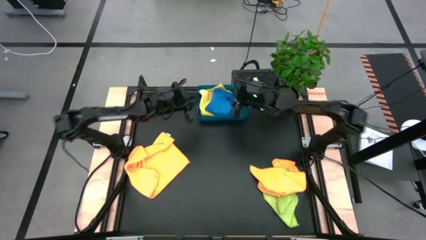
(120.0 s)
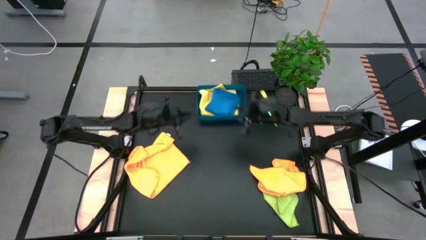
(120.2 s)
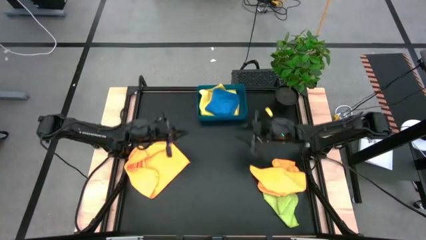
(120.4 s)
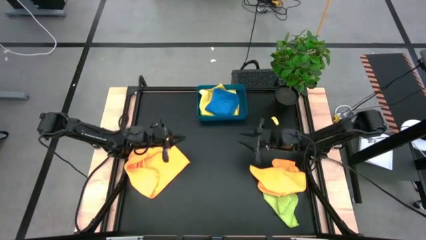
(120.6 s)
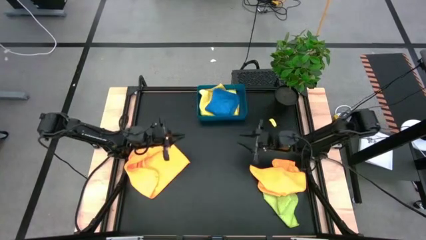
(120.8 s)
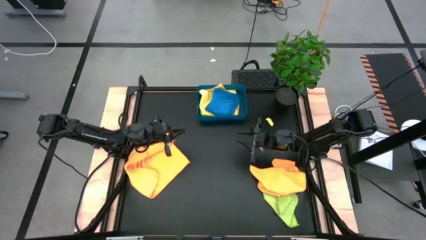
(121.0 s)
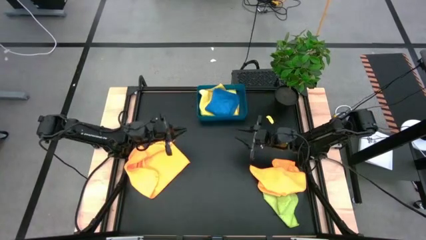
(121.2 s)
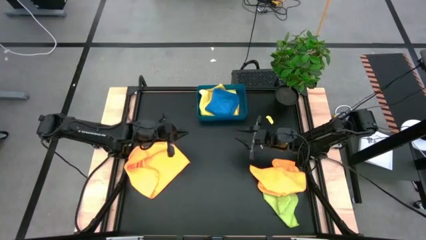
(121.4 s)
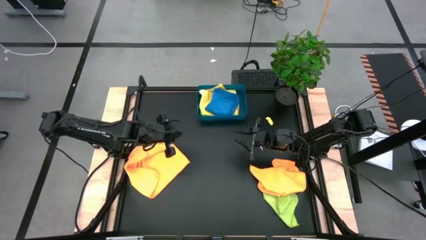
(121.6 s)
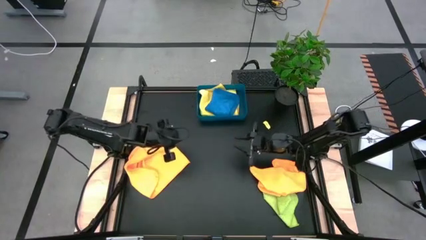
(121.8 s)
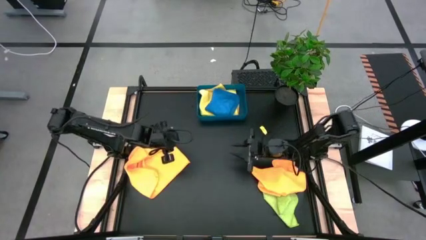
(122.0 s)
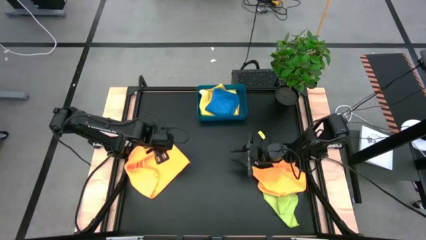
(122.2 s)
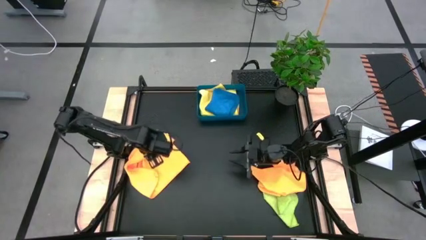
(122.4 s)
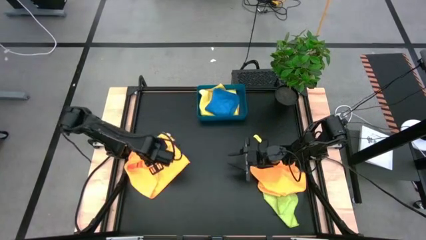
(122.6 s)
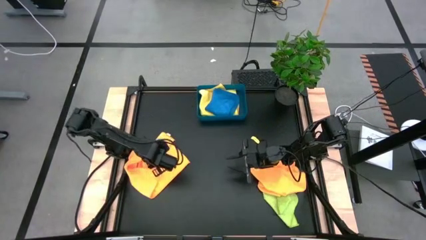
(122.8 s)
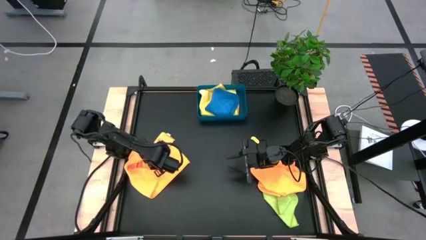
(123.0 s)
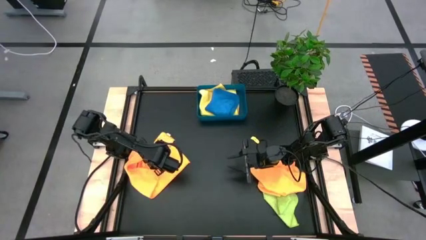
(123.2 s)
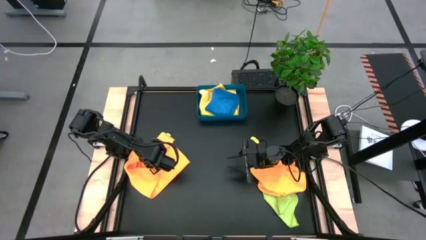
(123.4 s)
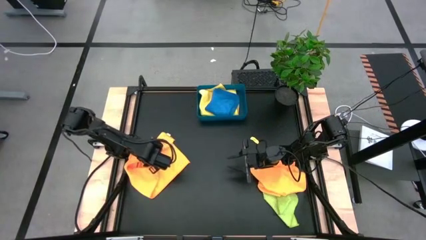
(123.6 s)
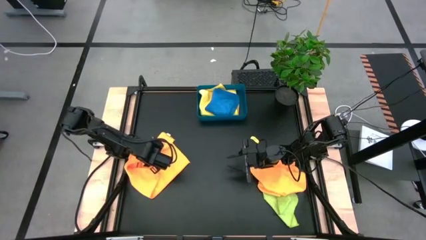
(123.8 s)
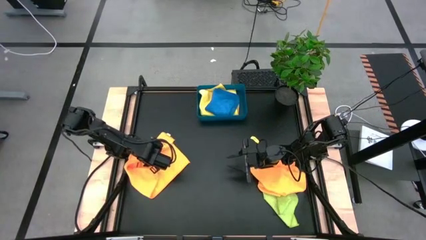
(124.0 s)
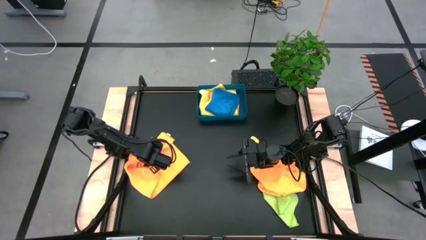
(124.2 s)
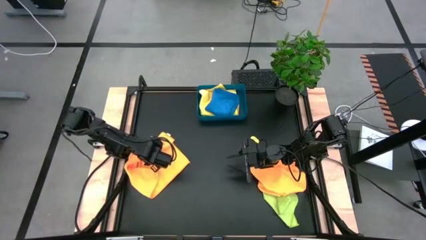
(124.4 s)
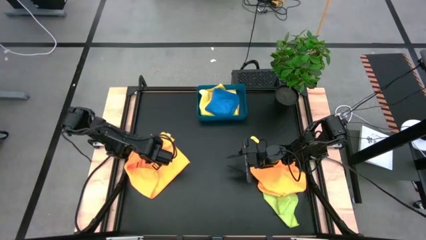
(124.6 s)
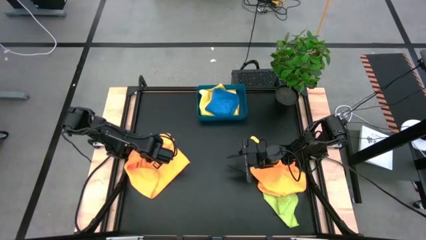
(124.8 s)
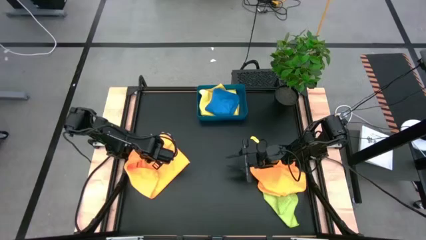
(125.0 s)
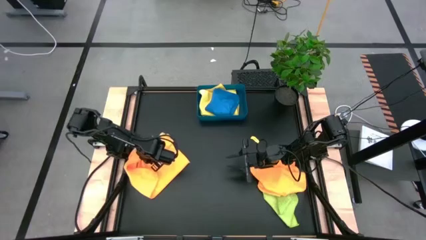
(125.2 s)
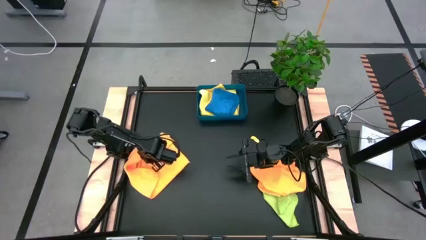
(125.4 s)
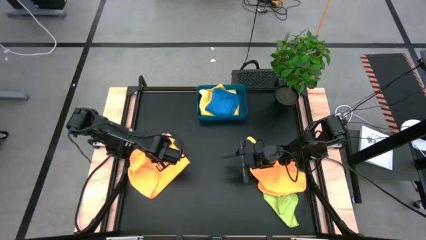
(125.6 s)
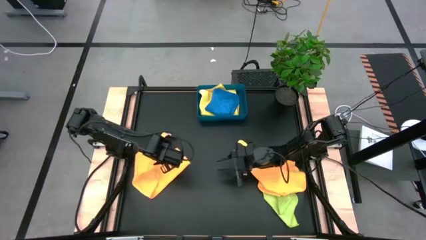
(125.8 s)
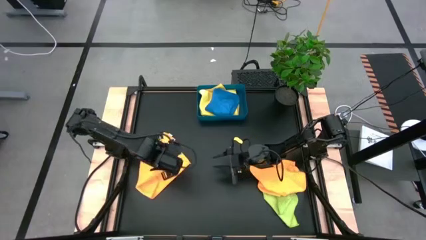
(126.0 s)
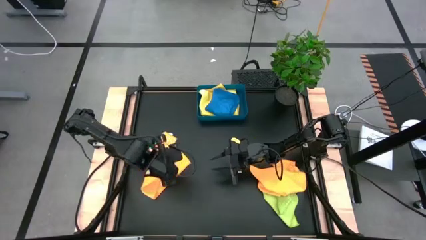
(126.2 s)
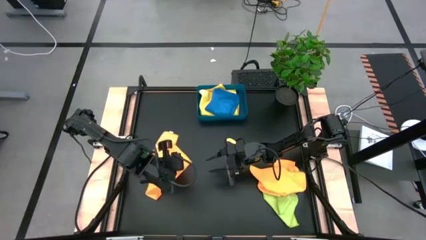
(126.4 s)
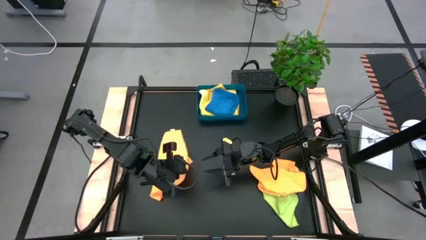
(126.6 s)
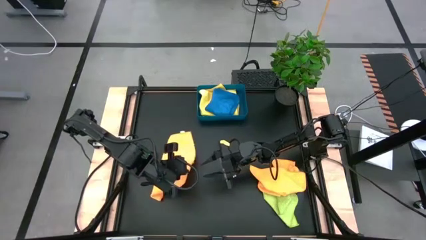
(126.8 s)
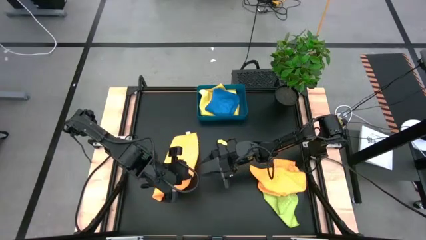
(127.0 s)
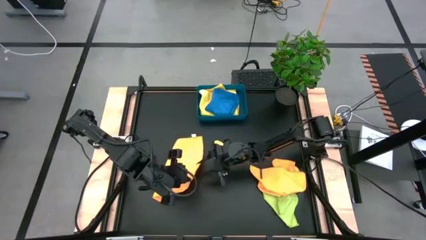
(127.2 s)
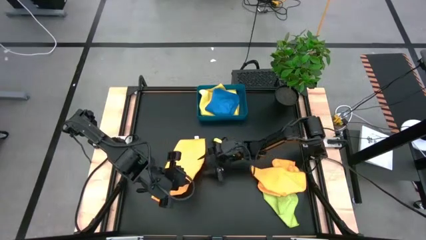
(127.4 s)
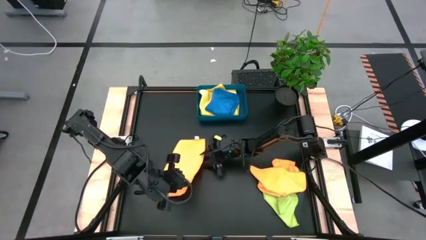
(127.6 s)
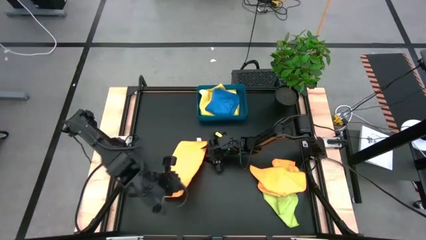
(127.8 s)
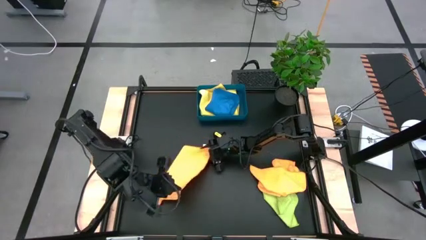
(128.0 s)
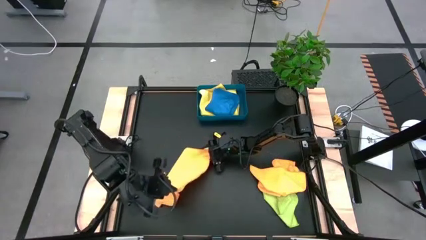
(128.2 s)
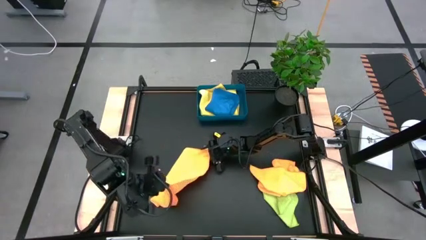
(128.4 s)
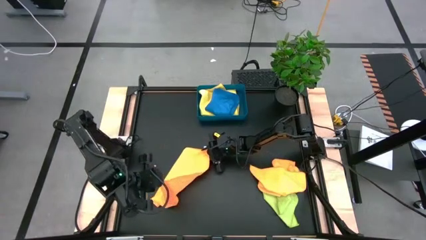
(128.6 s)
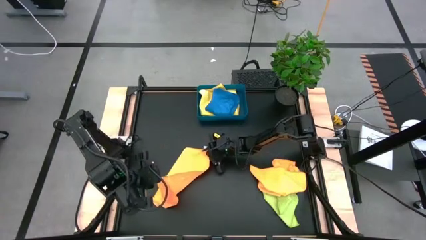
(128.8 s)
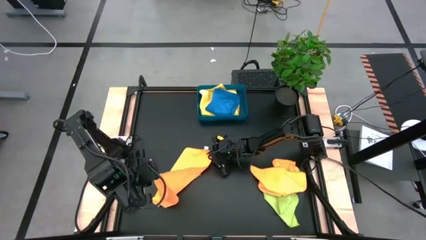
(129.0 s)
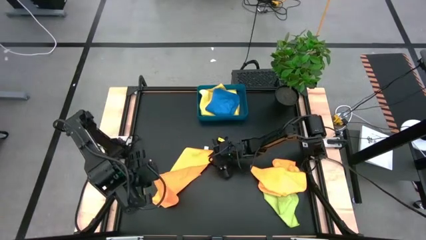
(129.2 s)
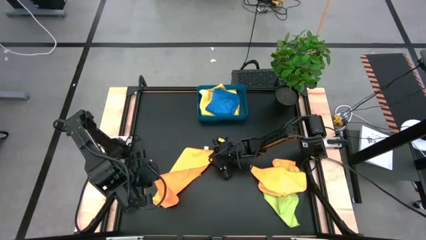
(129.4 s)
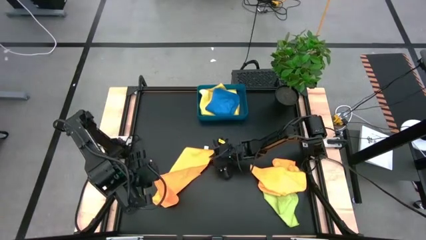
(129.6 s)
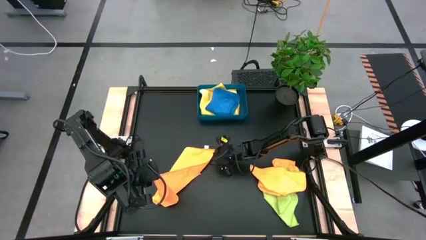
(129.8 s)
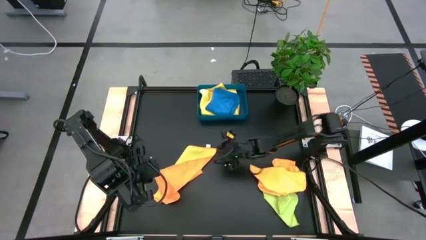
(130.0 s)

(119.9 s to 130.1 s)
Task: Fold microfiber towels
Fold the left orange microfiber towel

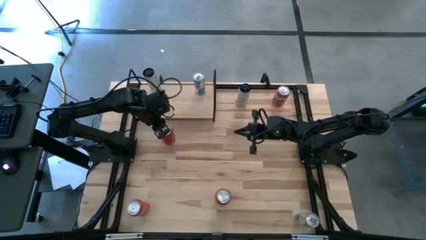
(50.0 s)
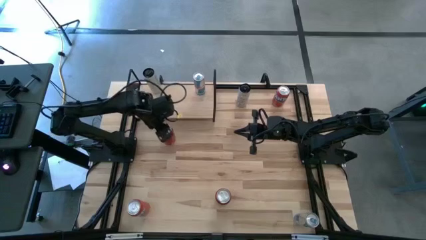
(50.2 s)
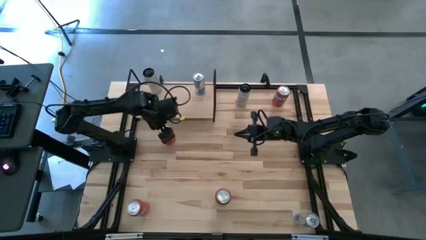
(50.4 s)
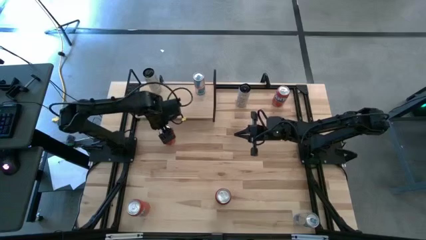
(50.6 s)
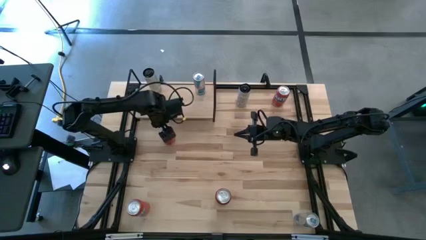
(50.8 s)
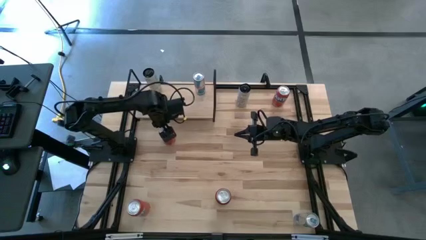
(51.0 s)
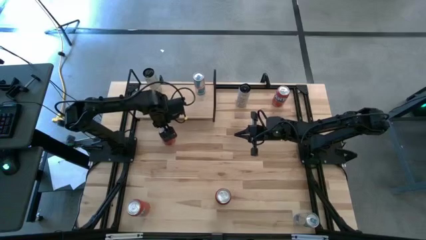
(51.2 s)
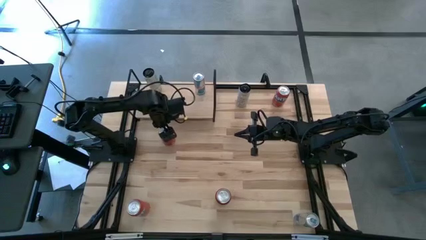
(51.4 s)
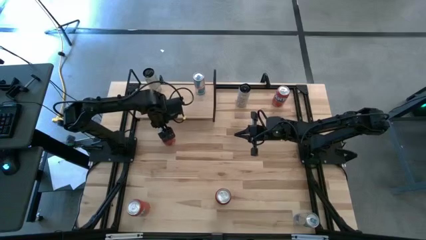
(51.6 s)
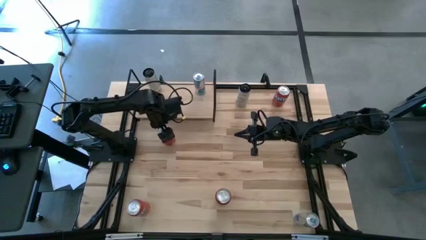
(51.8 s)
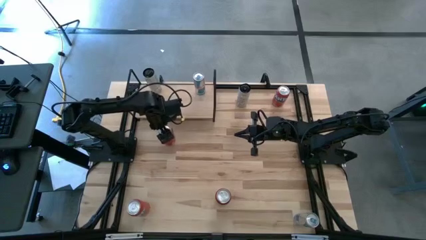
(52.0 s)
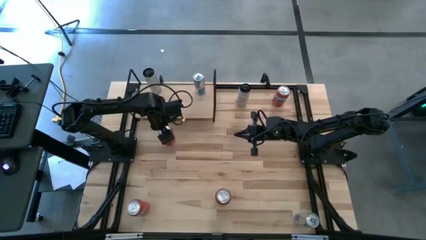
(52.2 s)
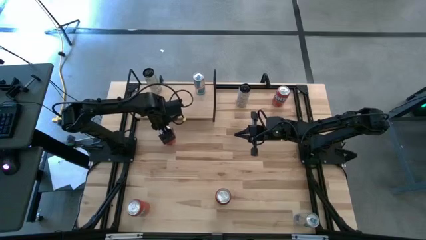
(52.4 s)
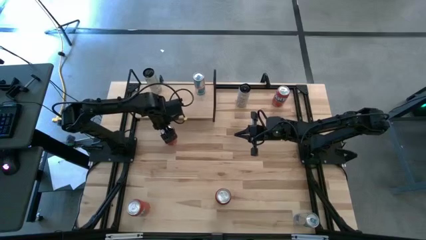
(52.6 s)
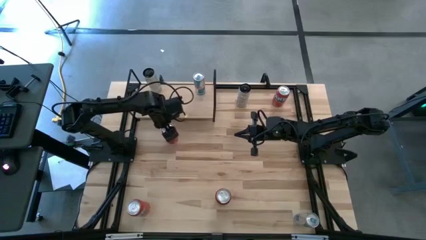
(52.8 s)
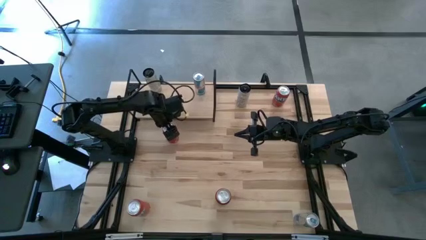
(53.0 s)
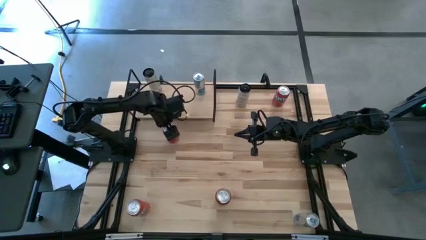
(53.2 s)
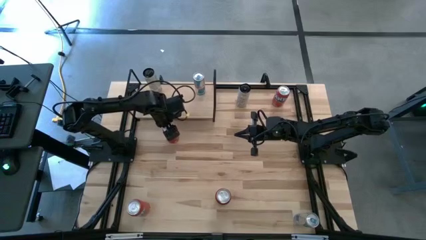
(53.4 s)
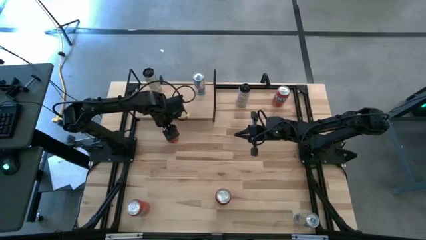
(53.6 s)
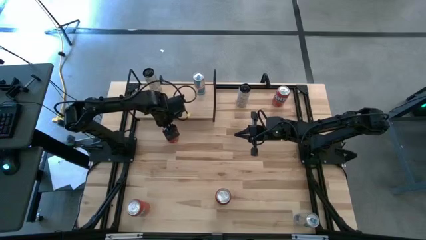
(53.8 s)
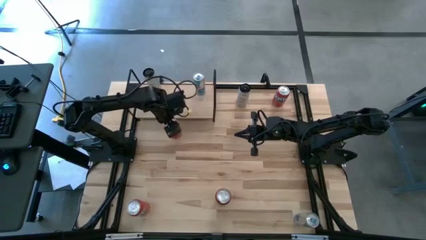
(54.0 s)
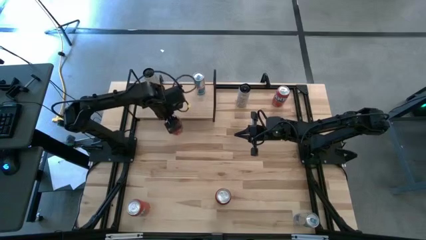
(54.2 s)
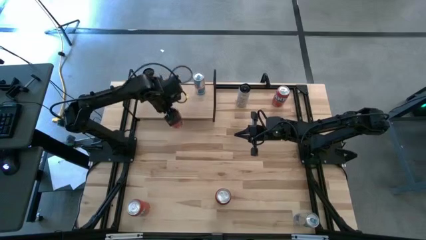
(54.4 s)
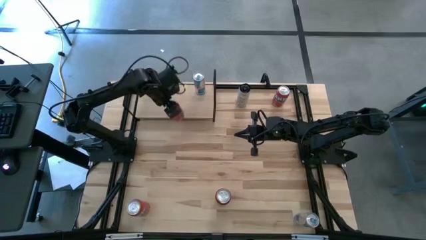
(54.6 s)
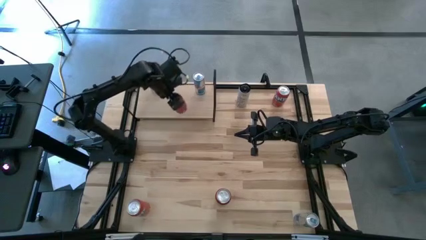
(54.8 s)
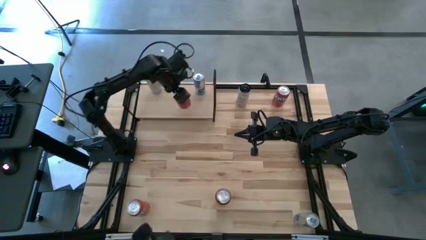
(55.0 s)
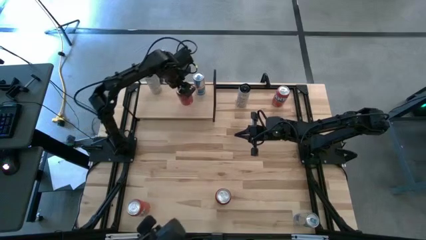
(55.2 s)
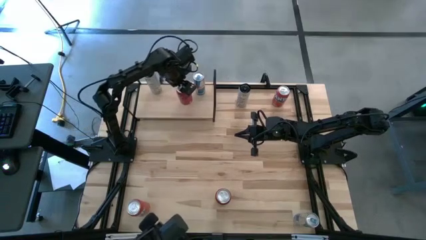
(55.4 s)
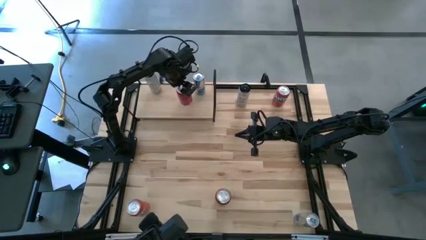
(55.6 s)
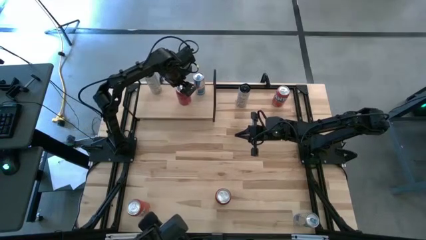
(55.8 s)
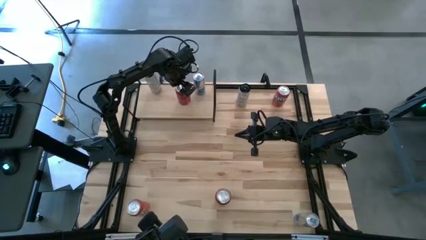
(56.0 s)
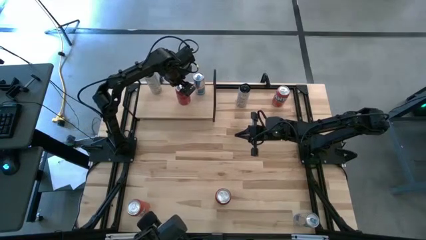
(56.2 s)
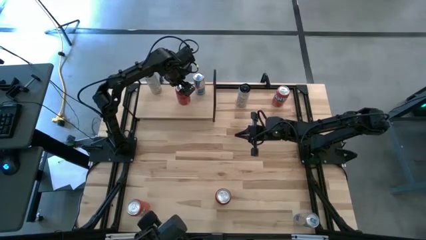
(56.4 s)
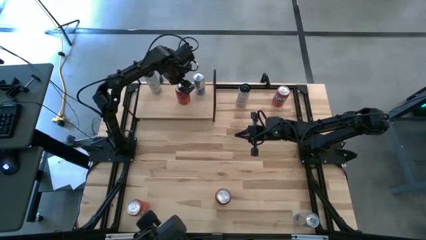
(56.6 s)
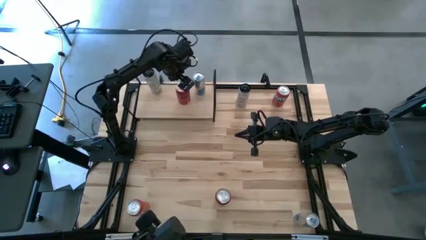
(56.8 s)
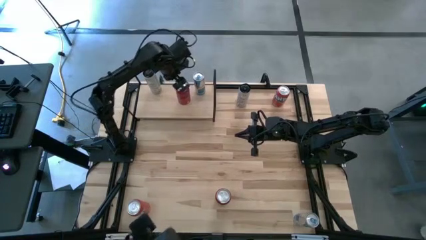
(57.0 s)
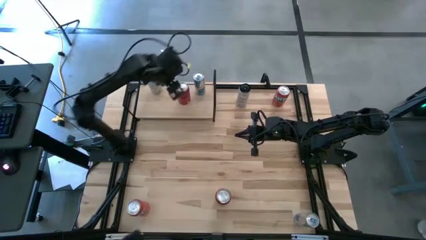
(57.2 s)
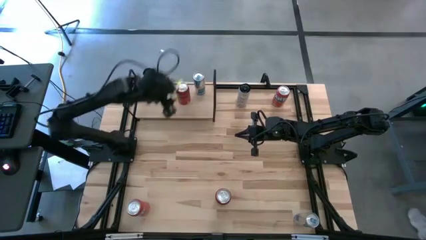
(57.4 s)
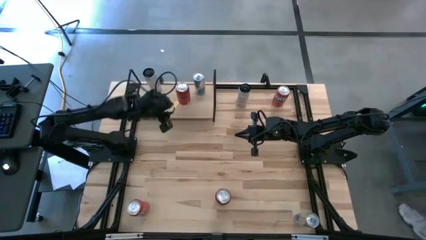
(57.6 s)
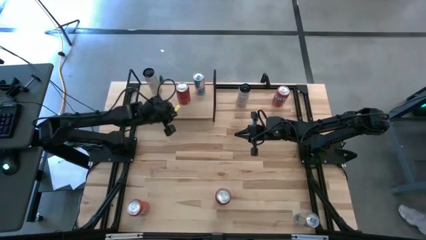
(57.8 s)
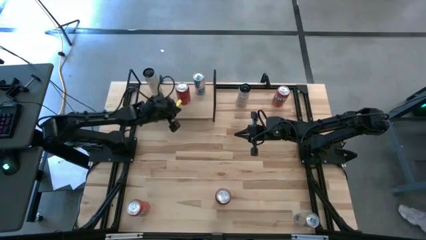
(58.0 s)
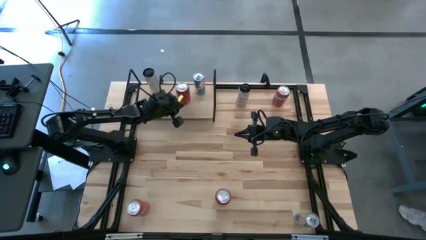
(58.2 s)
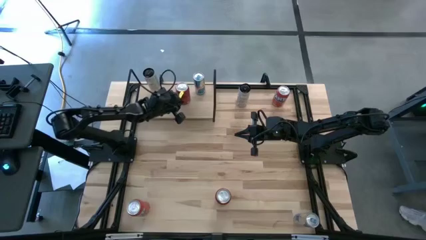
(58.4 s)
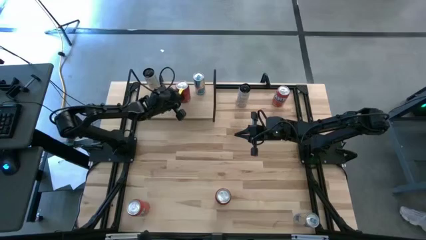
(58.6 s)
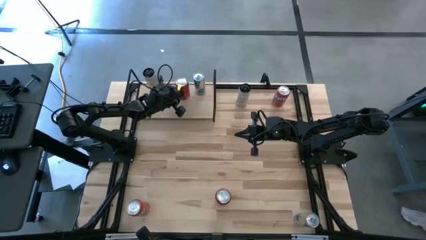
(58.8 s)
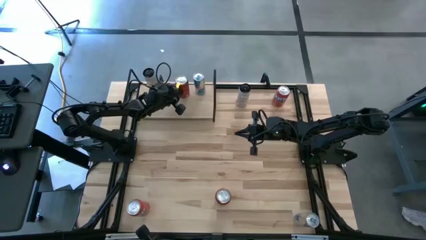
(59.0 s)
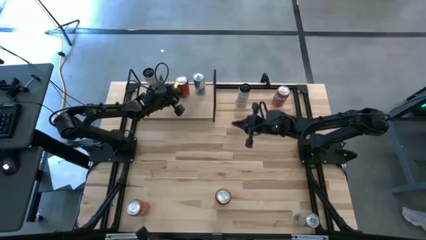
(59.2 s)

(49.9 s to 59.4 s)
Task: Place canned beverage on shelf
Put the top red soda can on the shelf
